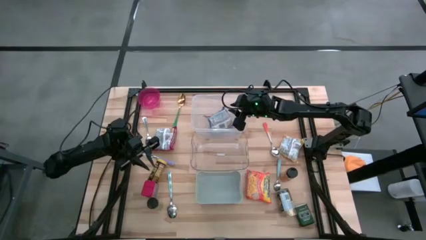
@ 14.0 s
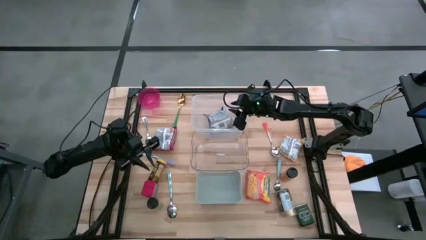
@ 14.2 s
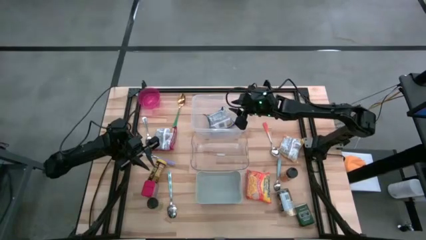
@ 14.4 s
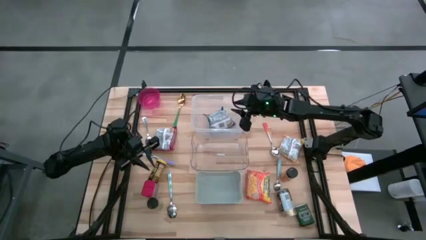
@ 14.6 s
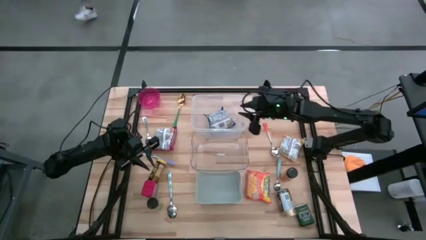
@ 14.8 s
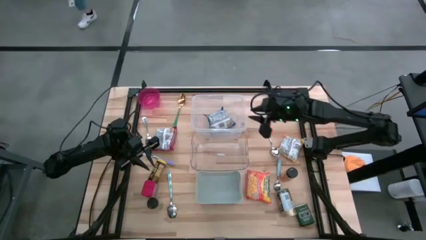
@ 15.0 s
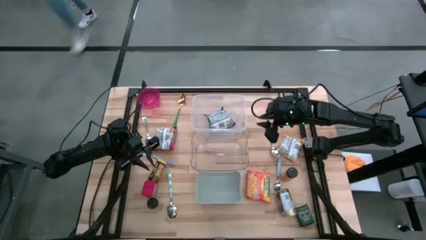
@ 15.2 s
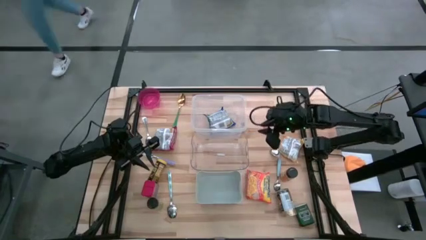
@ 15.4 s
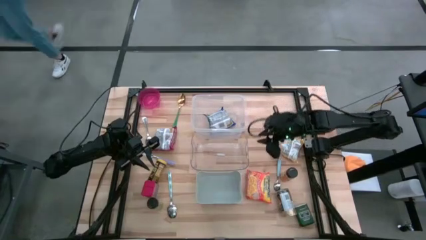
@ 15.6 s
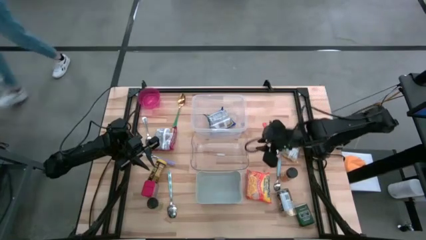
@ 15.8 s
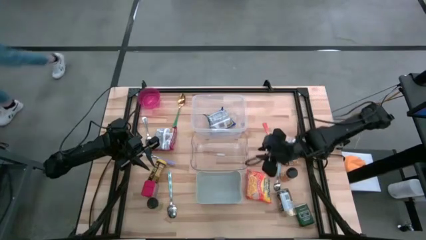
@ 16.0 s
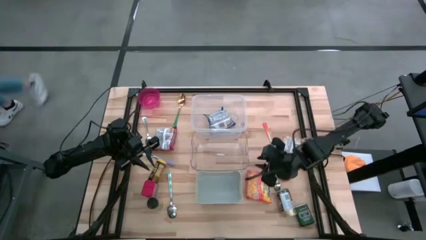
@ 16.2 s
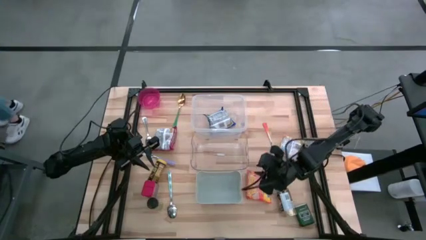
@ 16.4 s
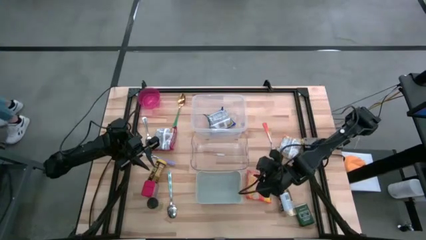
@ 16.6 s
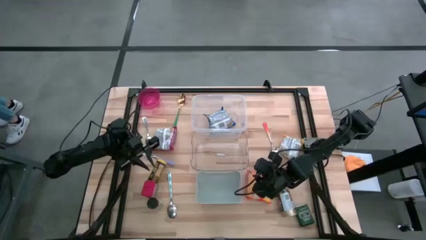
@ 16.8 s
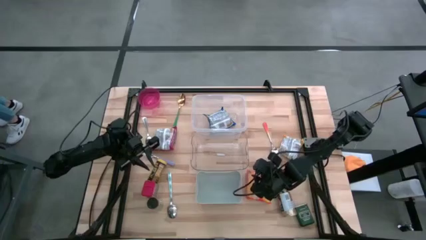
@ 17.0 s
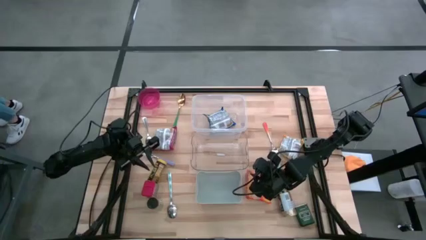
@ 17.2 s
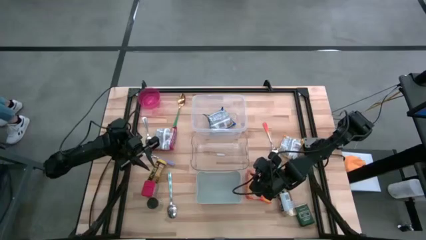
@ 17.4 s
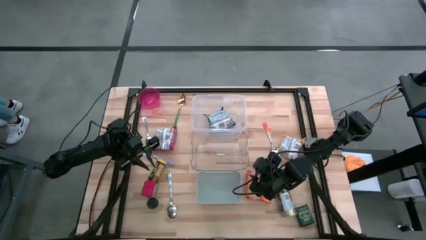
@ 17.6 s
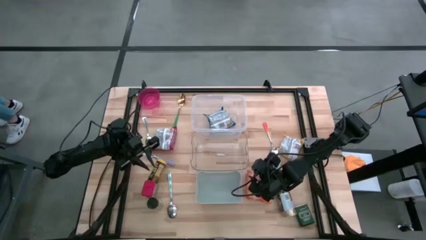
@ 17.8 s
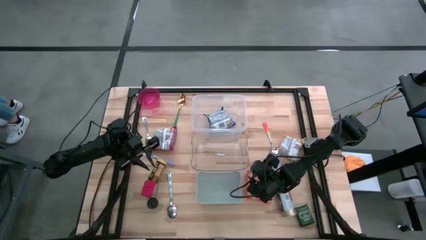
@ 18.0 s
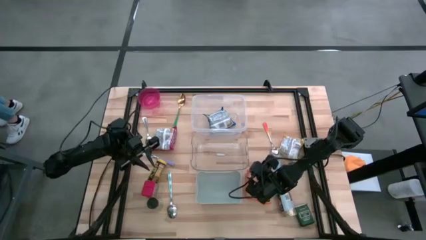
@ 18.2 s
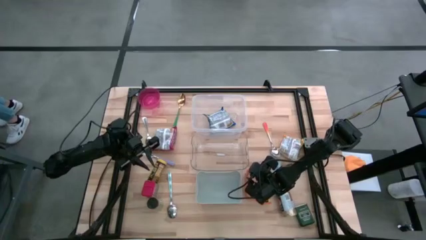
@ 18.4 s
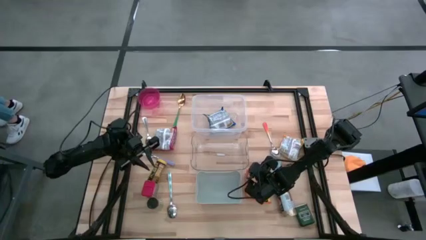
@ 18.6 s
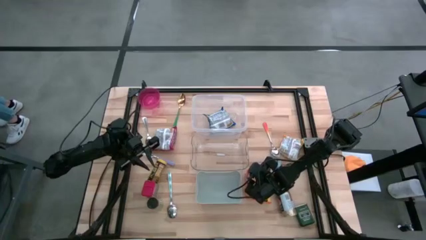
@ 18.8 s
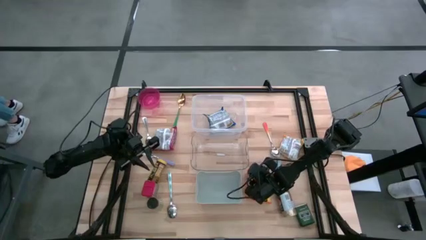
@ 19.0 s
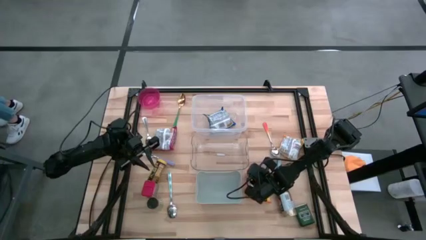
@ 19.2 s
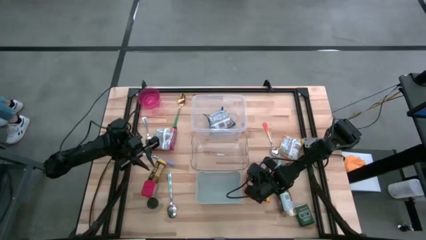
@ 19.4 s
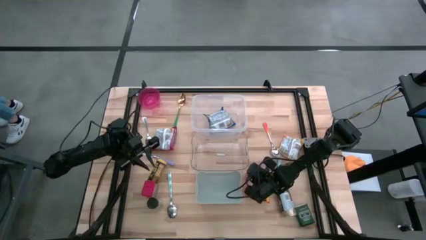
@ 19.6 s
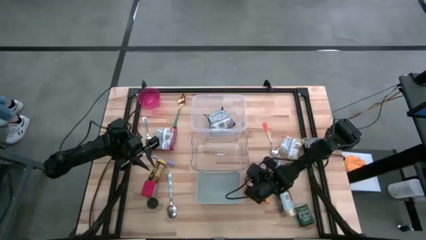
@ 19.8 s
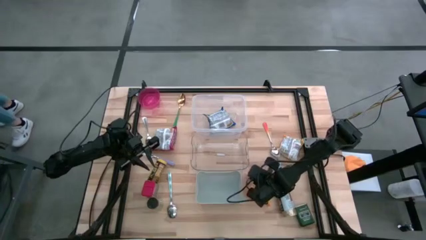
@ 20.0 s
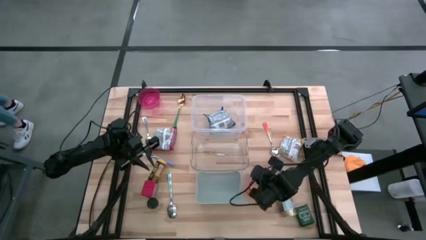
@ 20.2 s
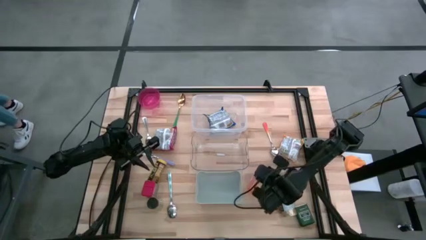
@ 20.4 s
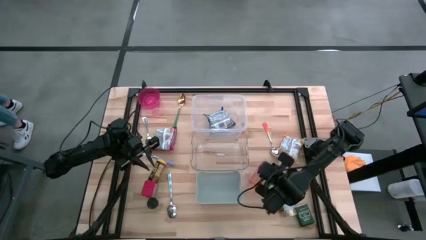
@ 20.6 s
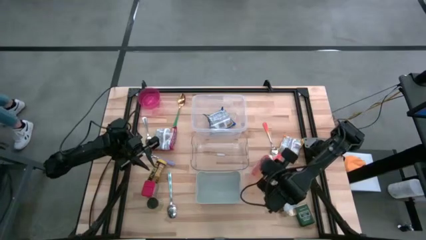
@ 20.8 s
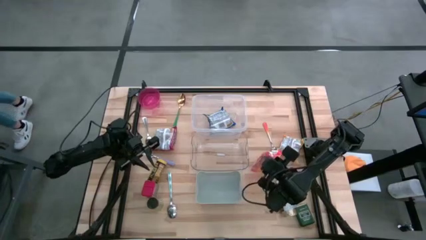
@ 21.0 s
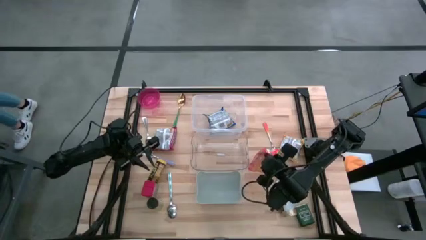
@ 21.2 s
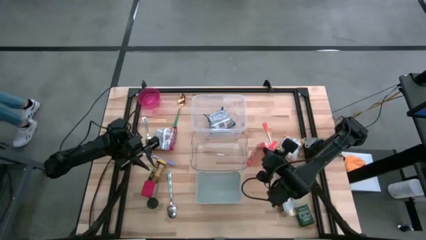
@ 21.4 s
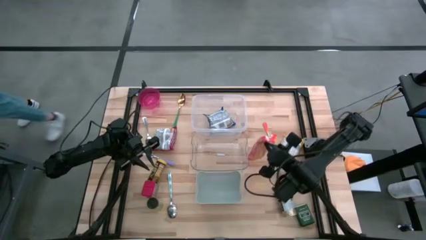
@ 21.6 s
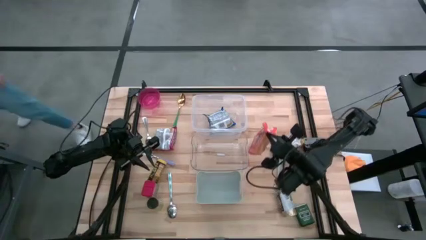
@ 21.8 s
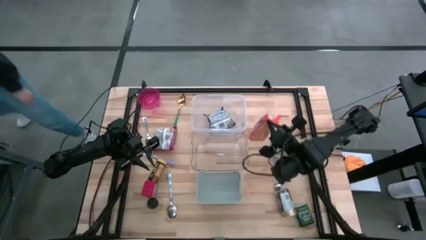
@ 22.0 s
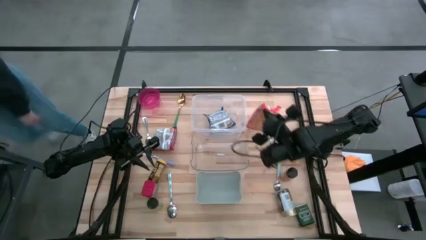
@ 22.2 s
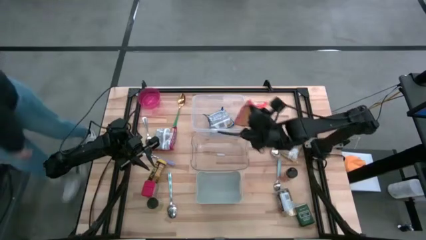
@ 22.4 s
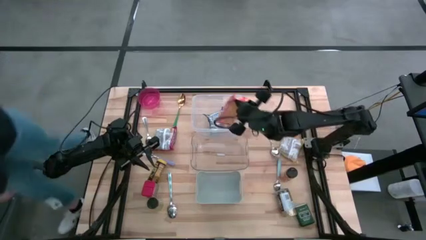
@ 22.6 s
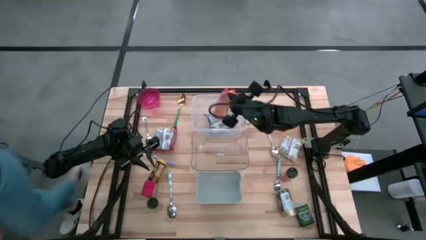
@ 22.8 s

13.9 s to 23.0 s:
Put the orange noodle pack into the white bin
